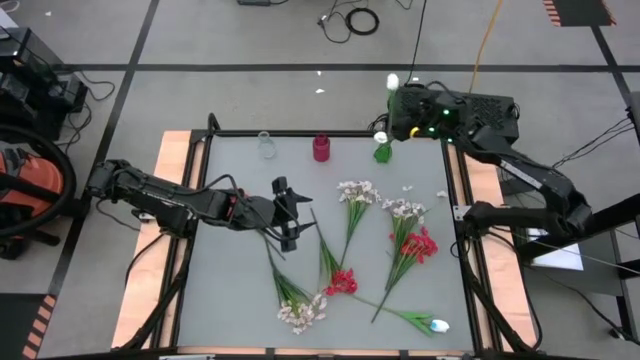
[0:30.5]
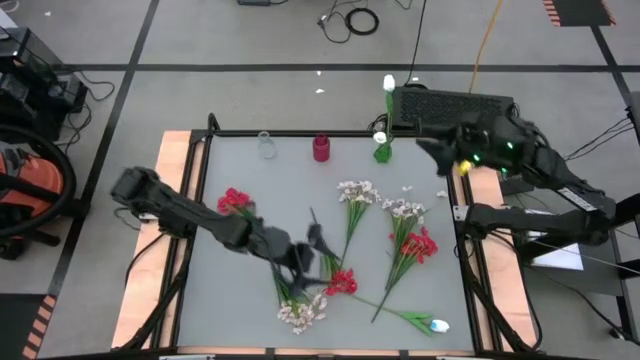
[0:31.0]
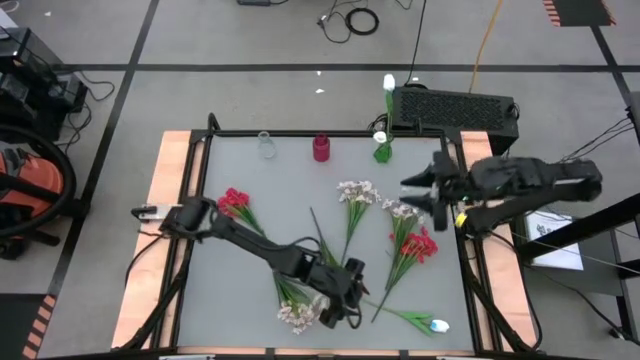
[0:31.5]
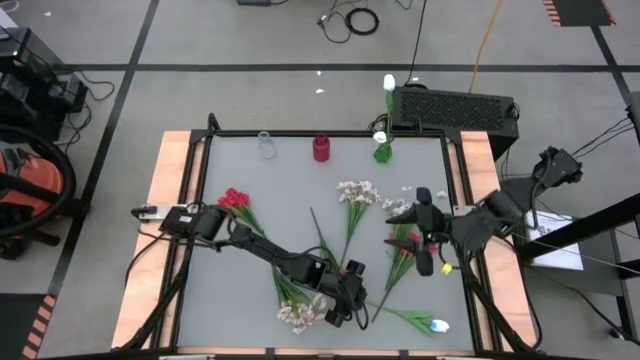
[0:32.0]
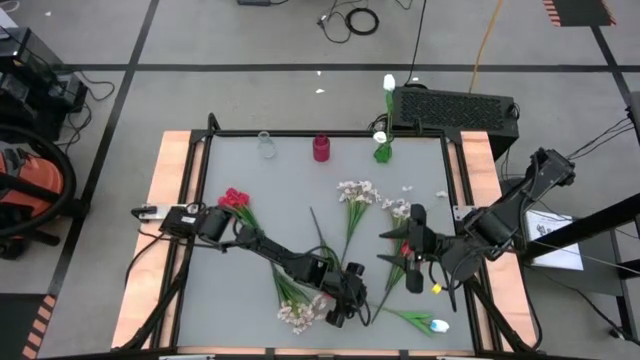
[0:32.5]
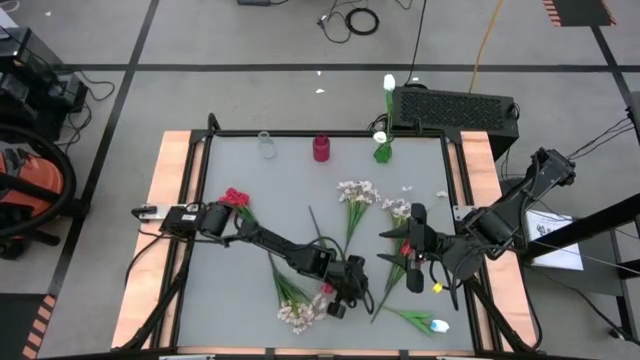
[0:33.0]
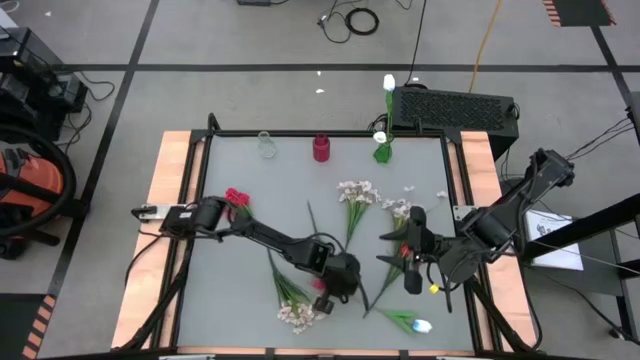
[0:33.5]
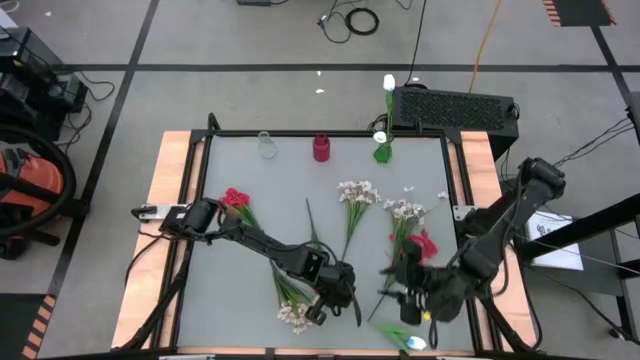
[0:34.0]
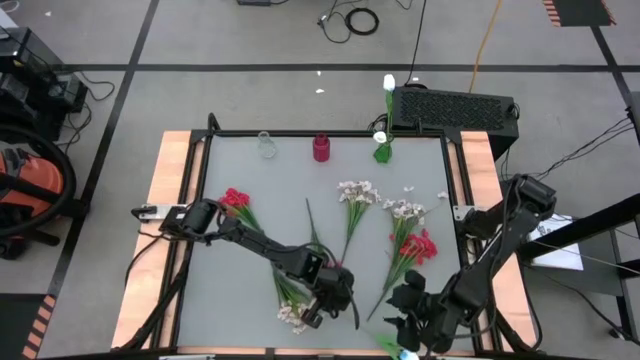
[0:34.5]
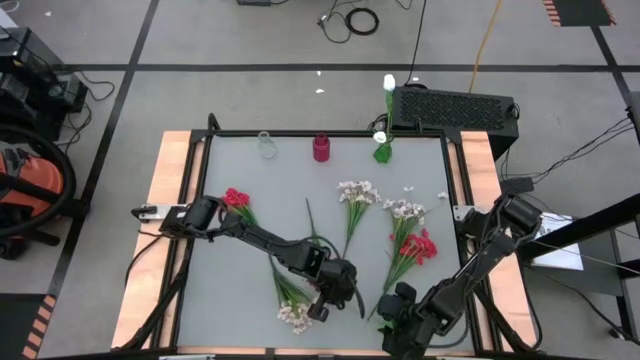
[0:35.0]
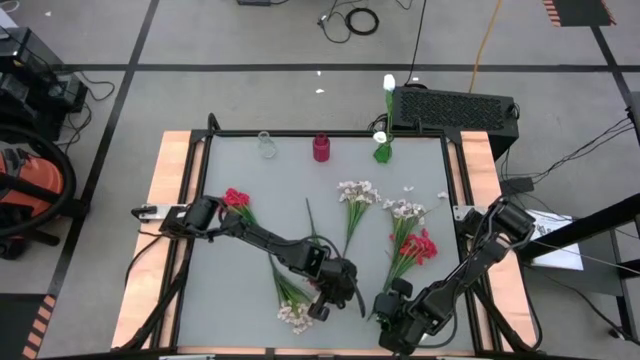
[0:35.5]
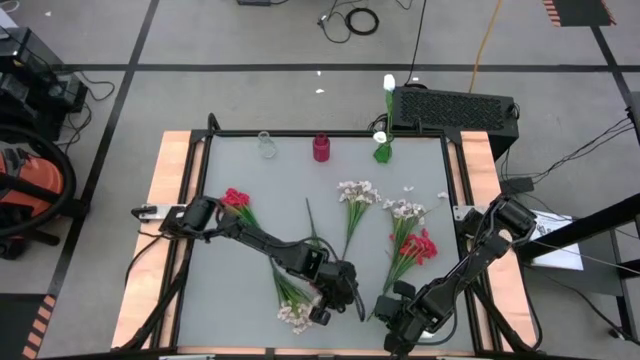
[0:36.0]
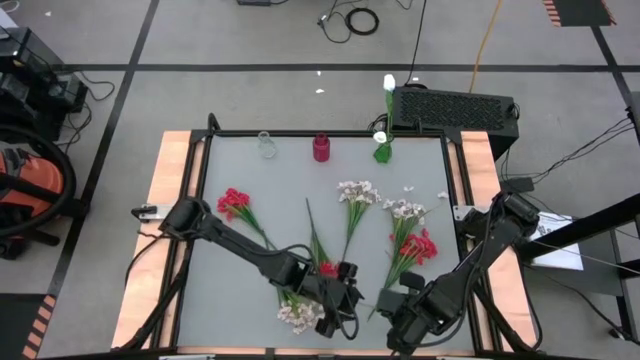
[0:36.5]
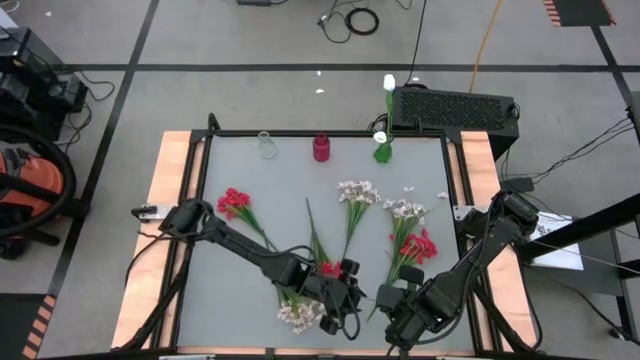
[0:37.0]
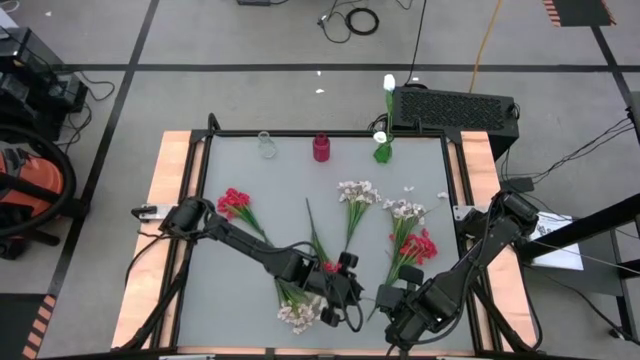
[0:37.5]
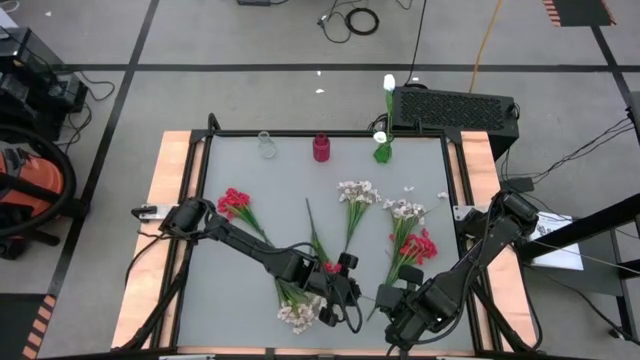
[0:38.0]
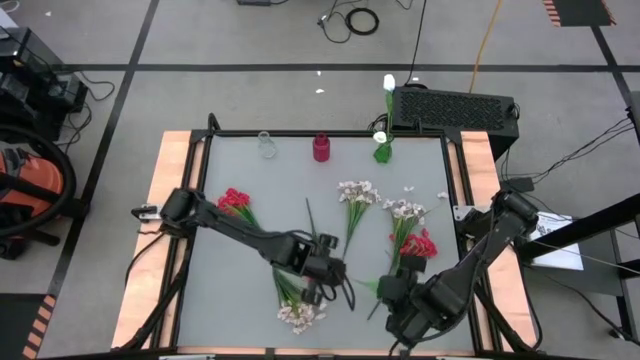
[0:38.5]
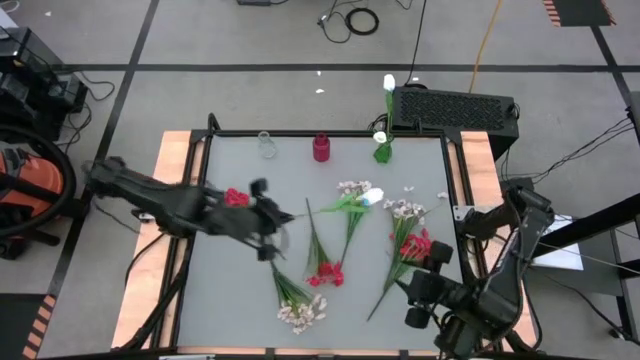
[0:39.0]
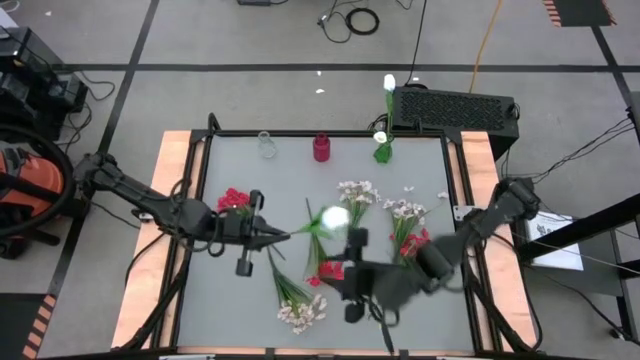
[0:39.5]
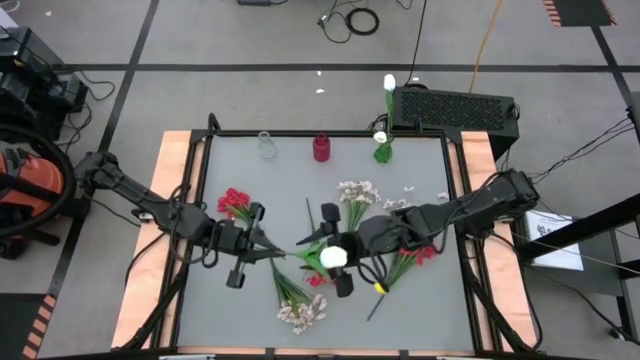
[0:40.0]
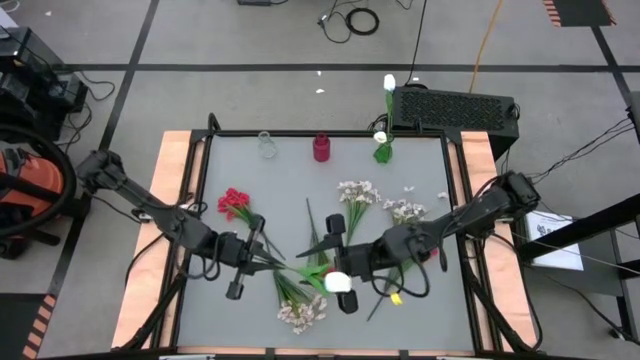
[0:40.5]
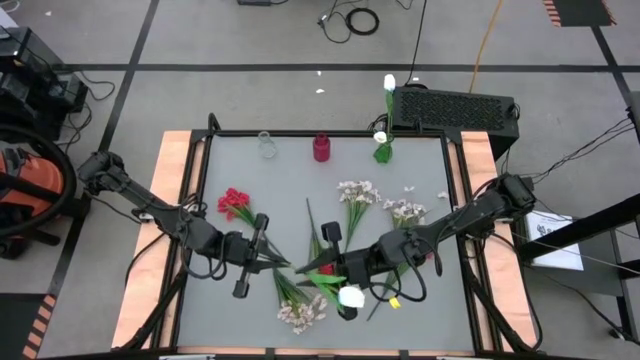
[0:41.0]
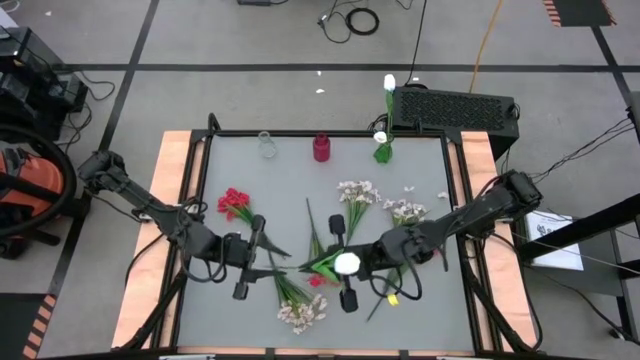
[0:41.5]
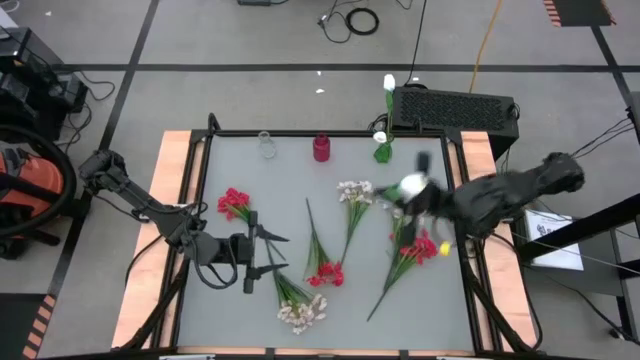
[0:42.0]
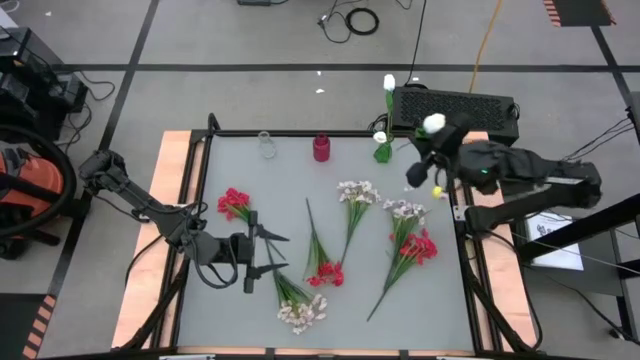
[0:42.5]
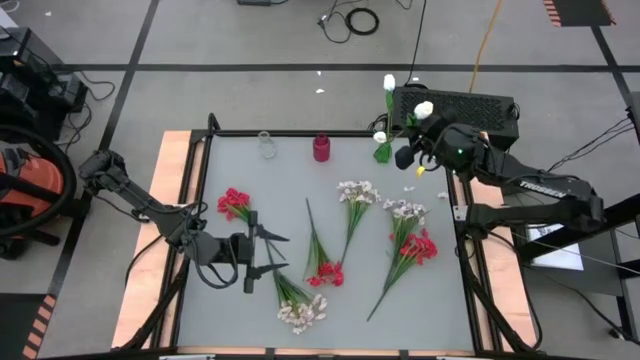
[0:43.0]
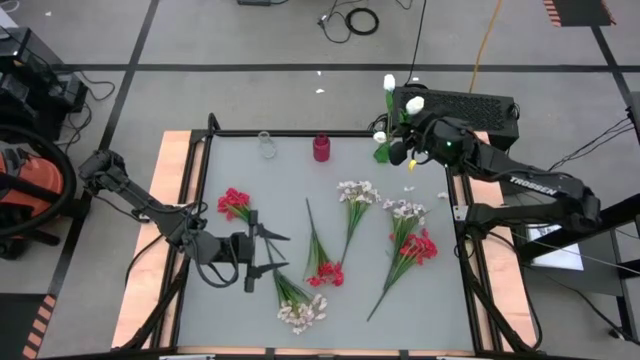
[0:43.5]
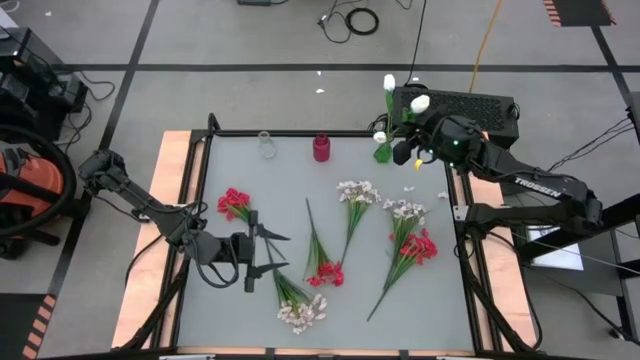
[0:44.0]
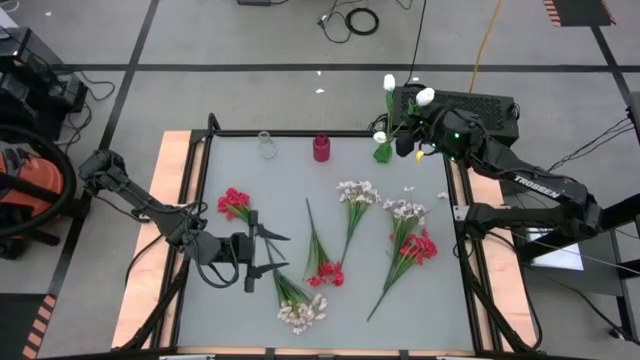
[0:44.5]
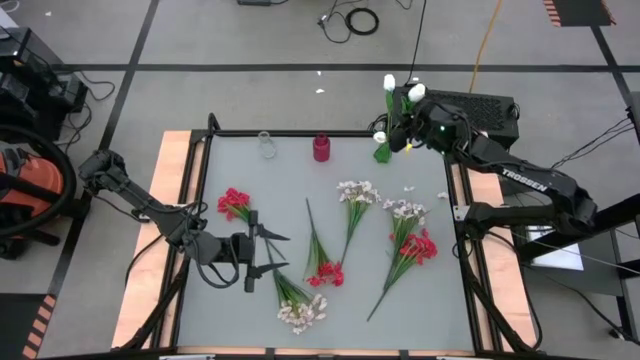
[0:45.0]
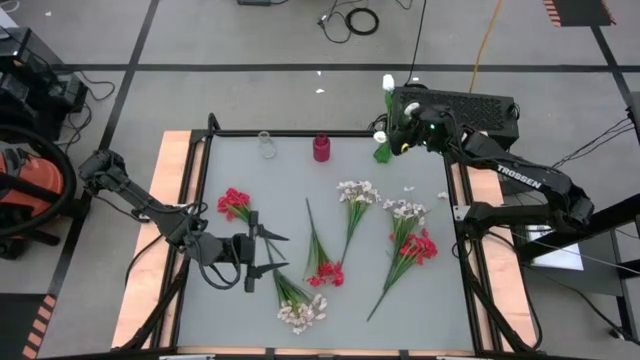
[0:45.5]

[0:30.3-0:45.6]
Task: Sort flowers into vase by color
Put the bottom white tulip into the green vase

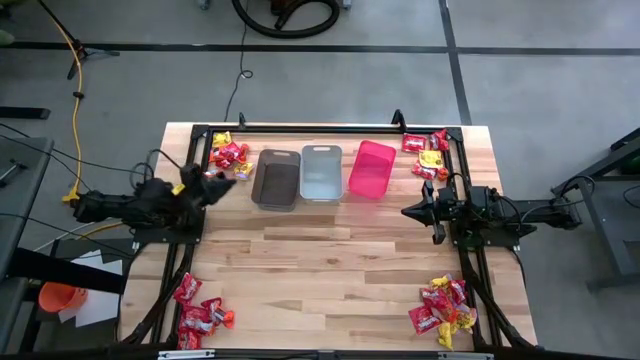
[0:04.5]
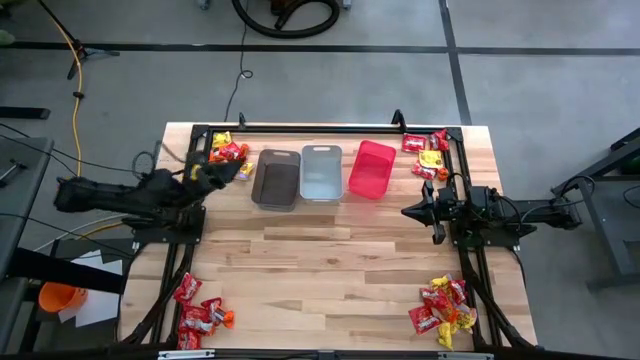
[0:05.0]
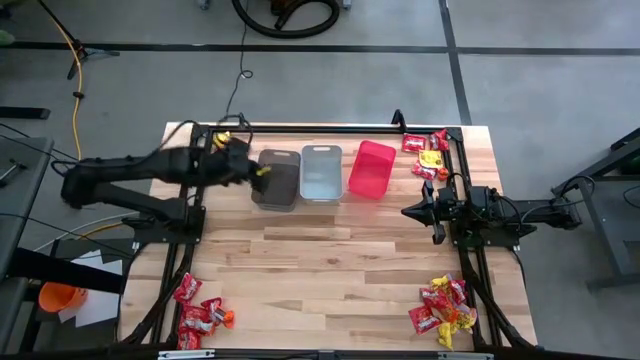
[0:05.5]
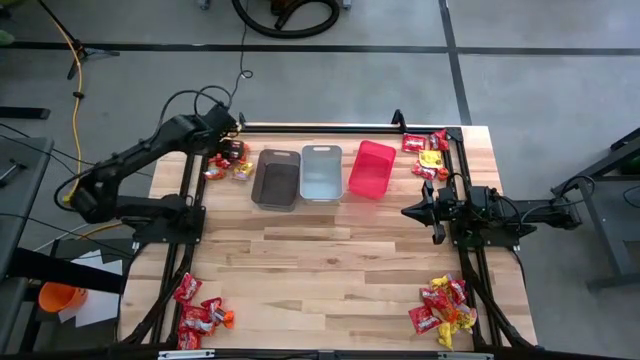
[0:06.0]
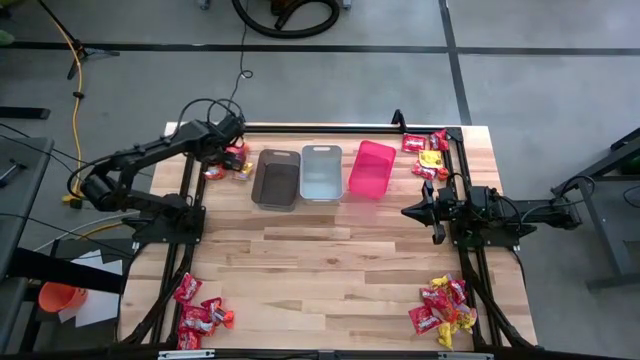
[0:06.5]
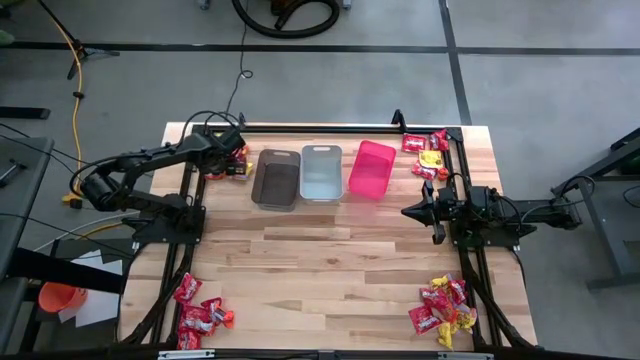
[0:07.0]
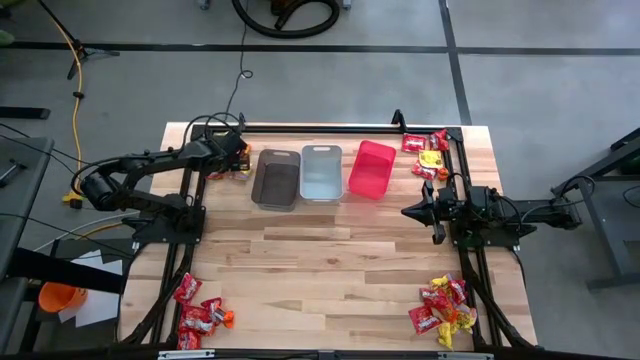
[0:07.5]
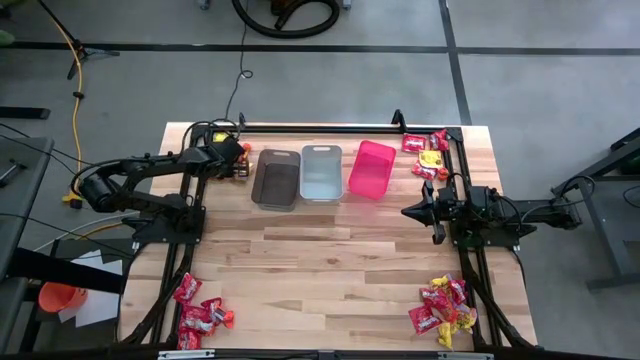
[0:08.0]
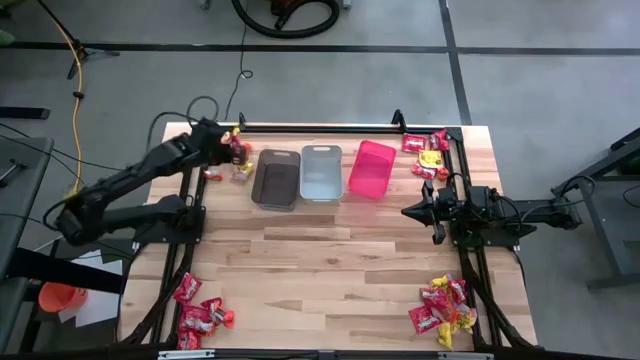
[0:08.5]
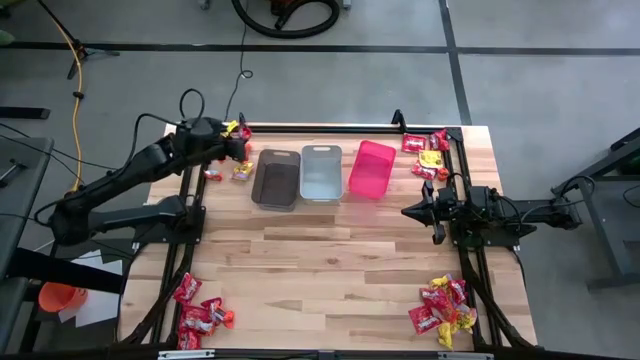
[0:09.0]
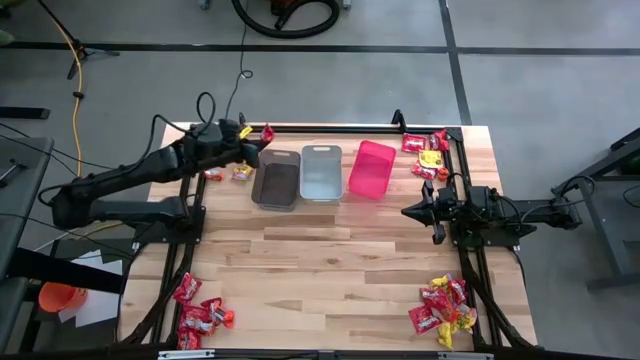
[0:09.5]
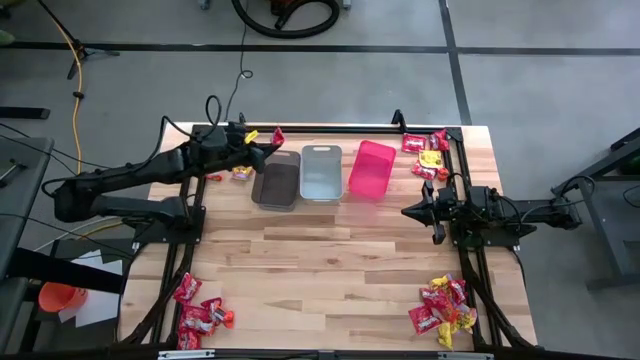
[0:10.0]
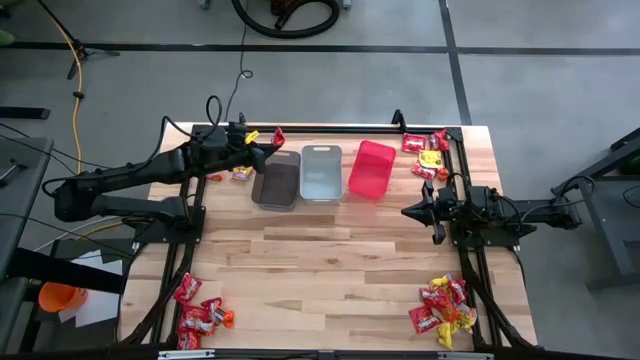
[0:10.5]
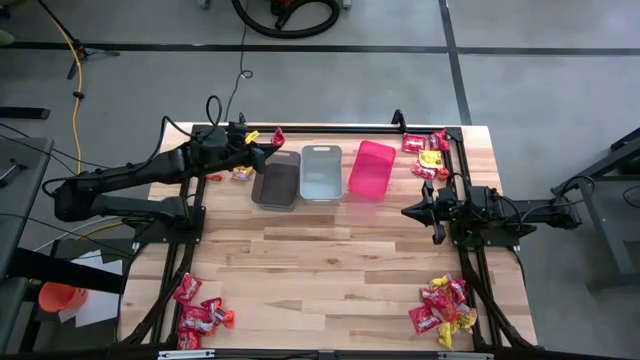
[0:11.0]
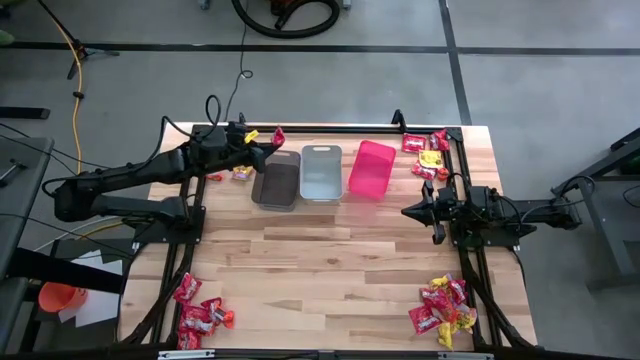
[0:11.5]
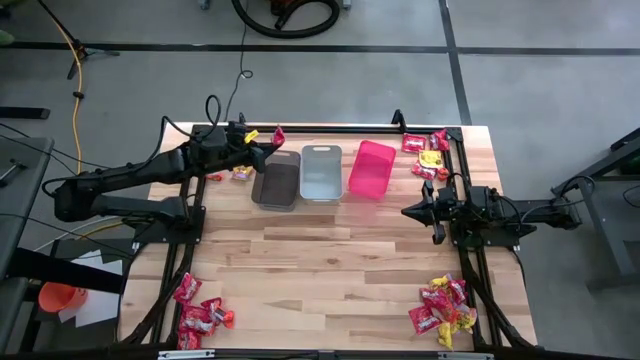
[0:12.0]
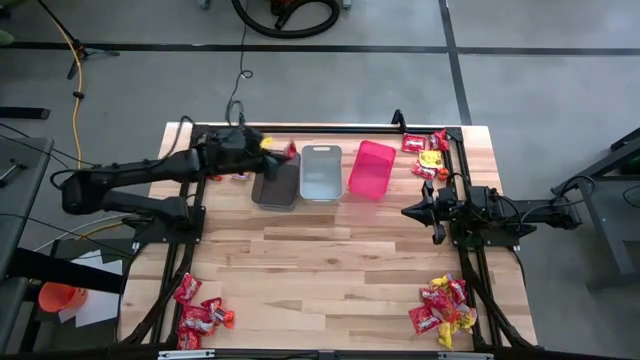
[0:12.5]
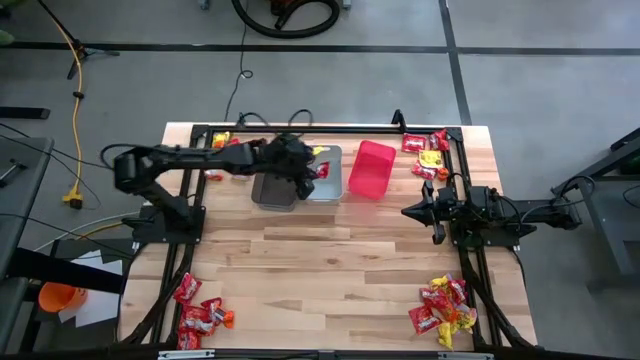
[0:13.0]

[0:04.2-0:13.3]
Task: Sort candy
Put the top left red candy into the gray bin
